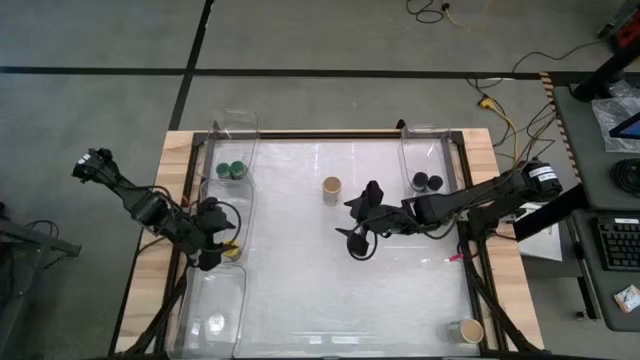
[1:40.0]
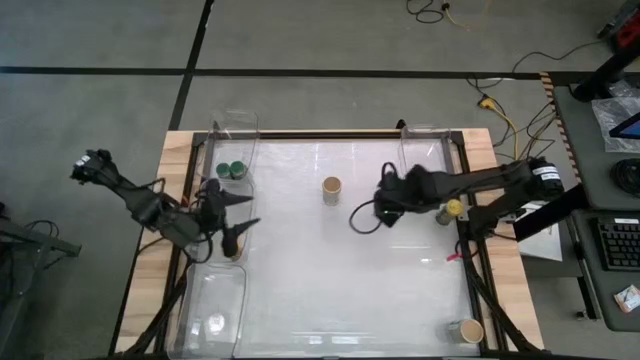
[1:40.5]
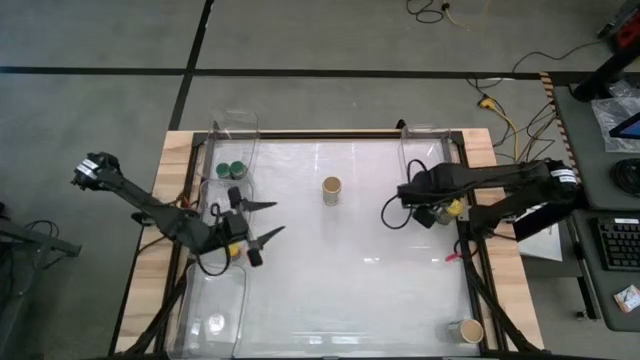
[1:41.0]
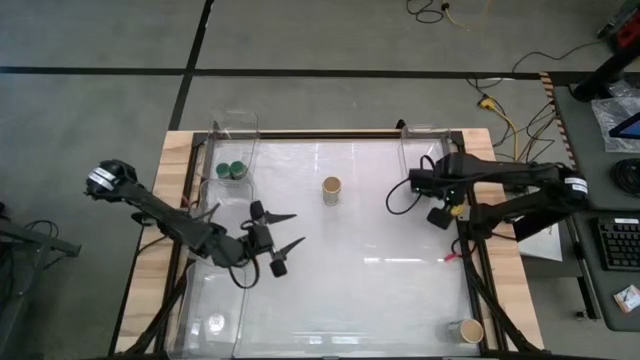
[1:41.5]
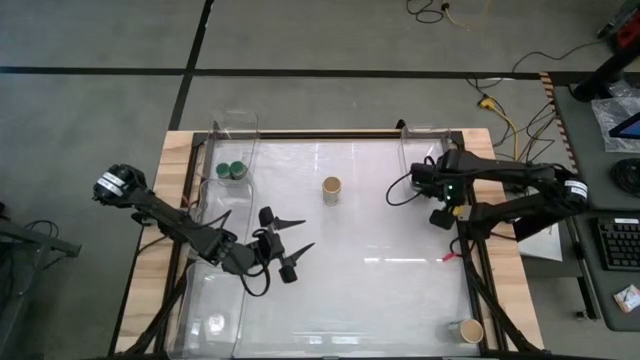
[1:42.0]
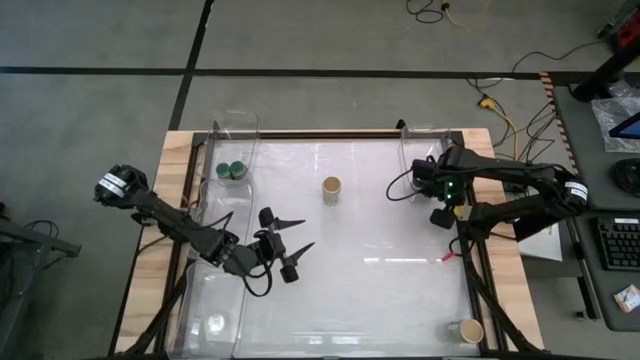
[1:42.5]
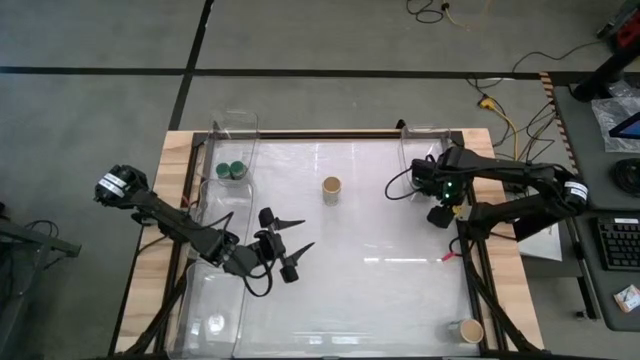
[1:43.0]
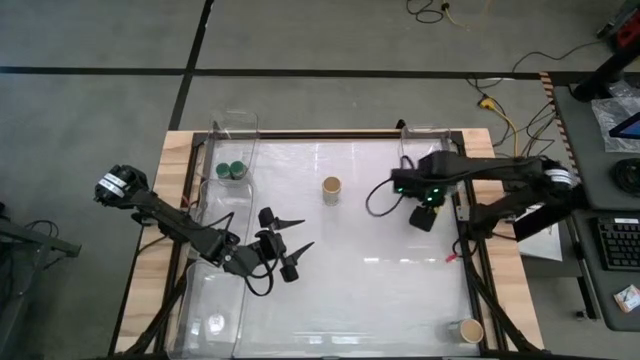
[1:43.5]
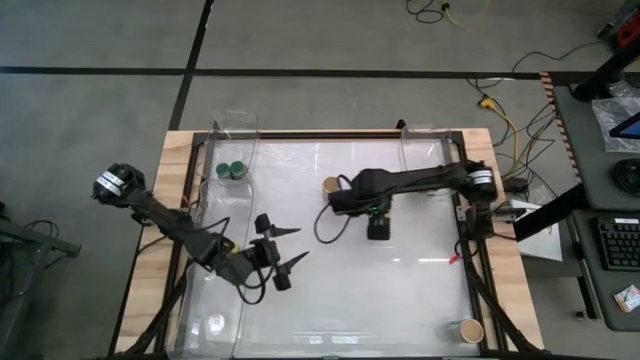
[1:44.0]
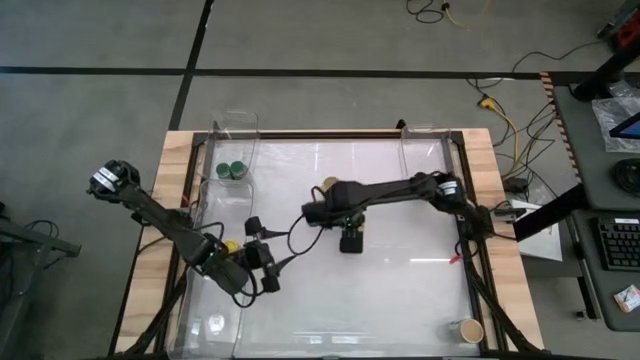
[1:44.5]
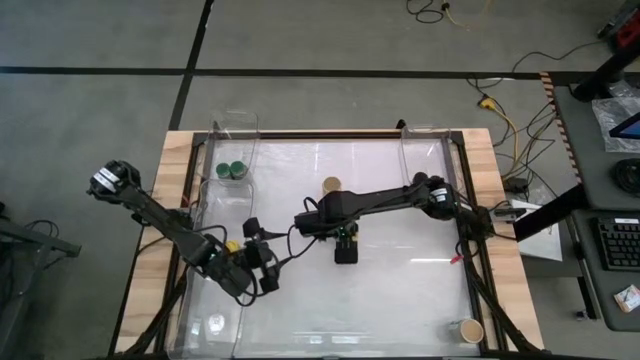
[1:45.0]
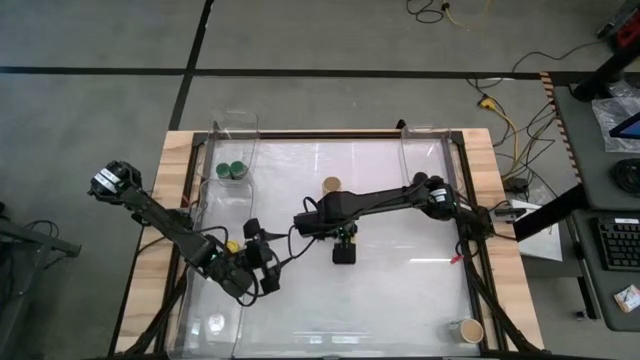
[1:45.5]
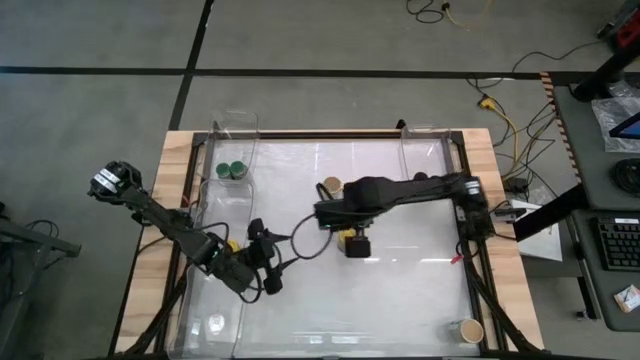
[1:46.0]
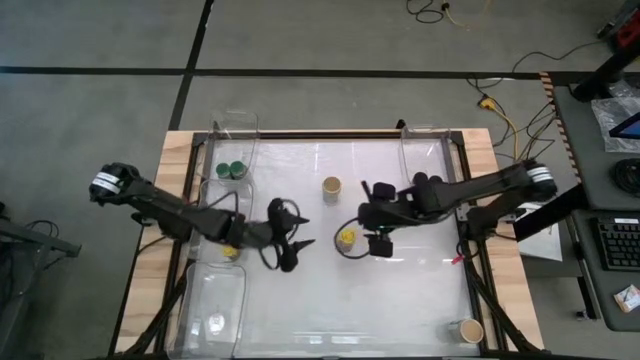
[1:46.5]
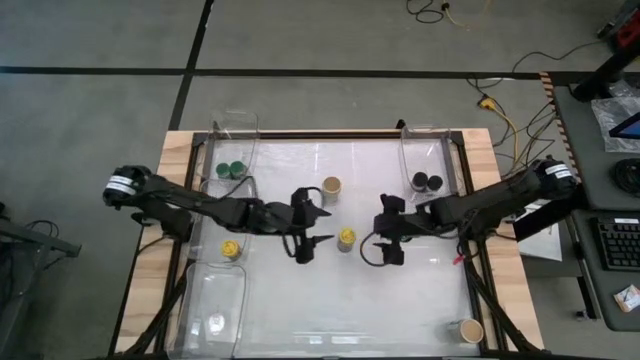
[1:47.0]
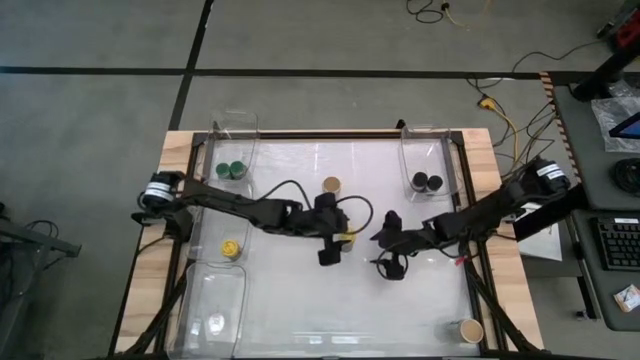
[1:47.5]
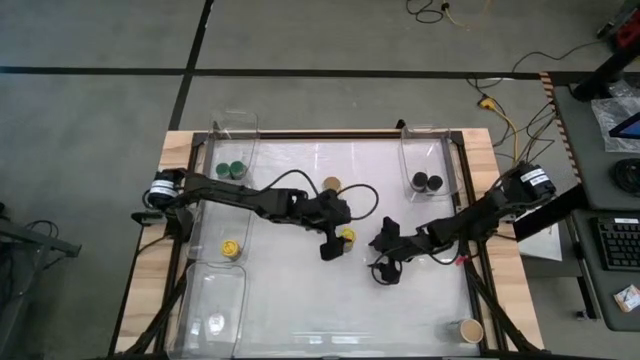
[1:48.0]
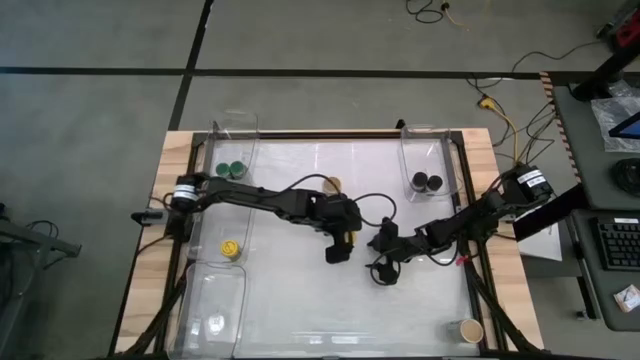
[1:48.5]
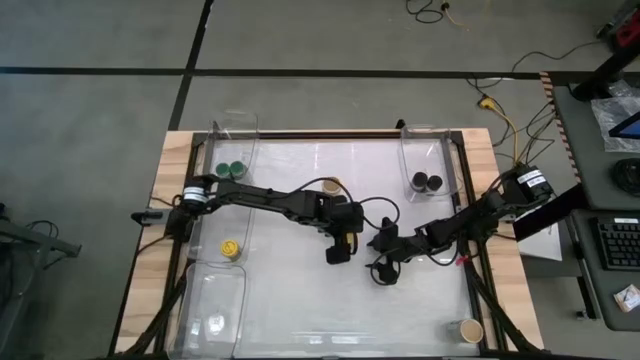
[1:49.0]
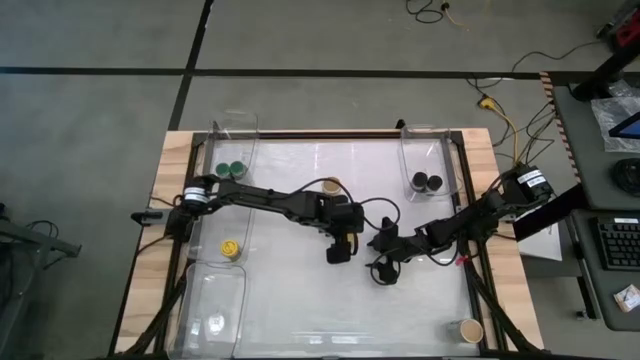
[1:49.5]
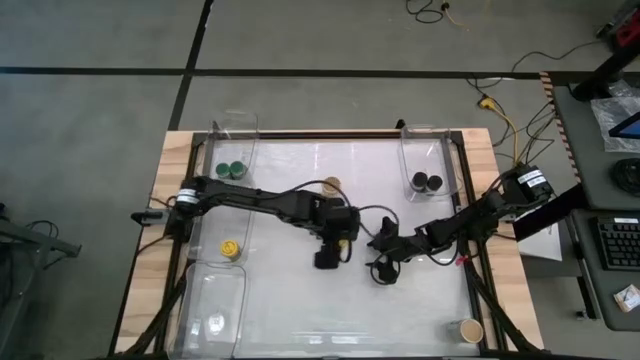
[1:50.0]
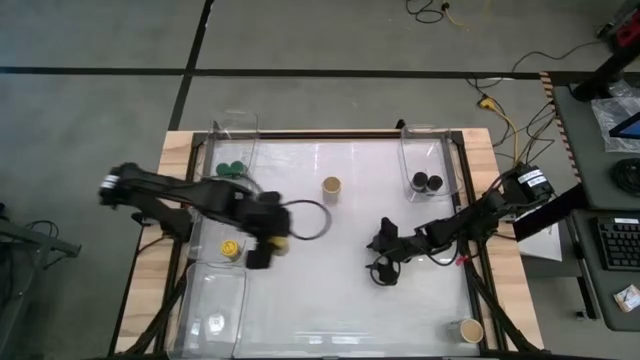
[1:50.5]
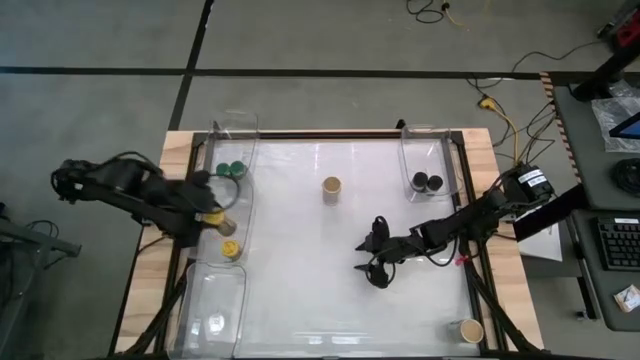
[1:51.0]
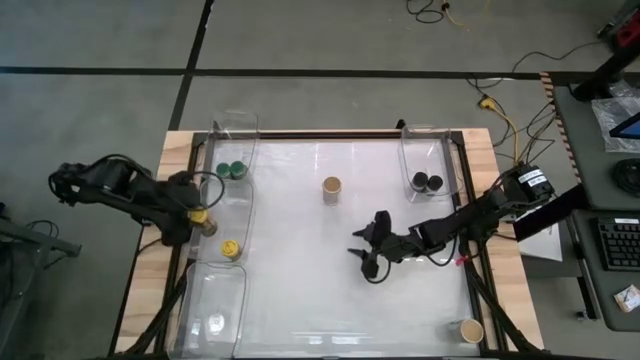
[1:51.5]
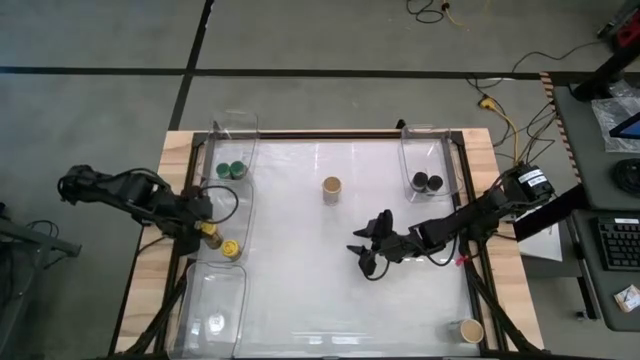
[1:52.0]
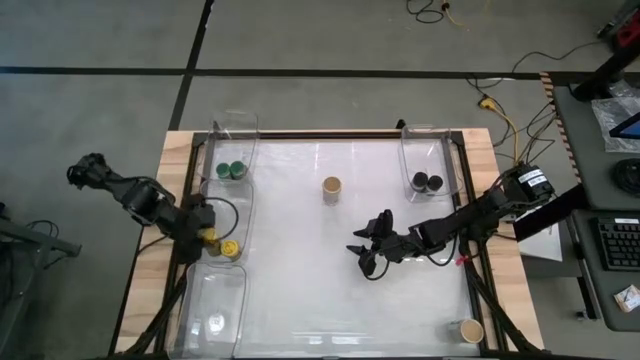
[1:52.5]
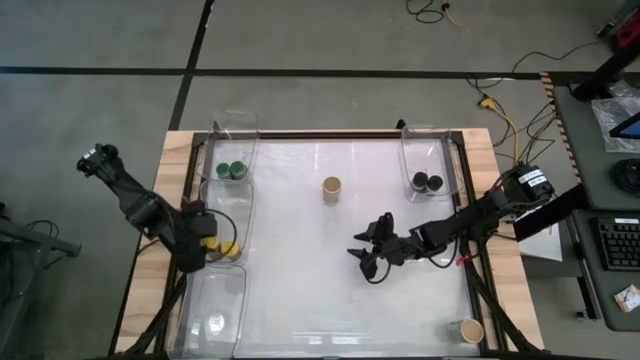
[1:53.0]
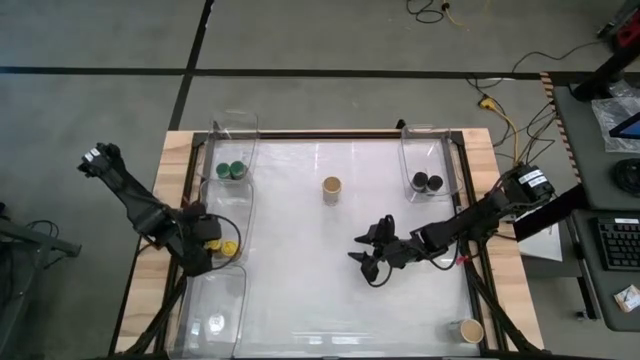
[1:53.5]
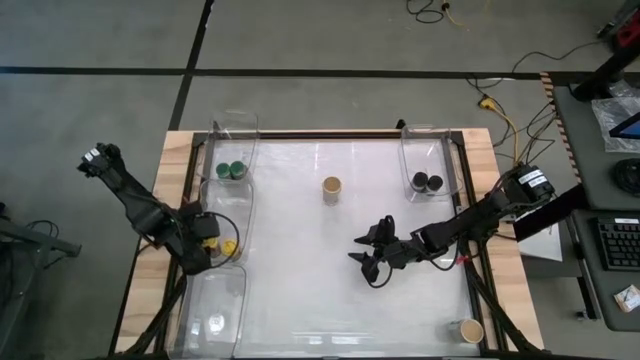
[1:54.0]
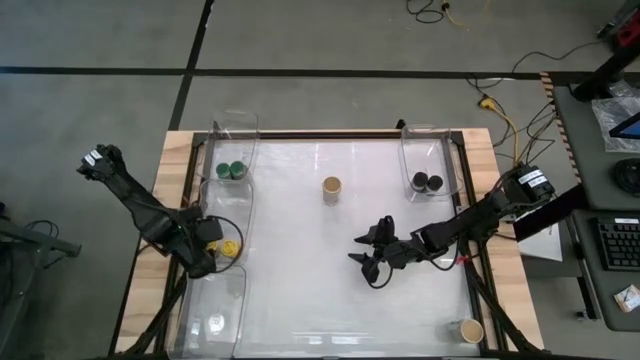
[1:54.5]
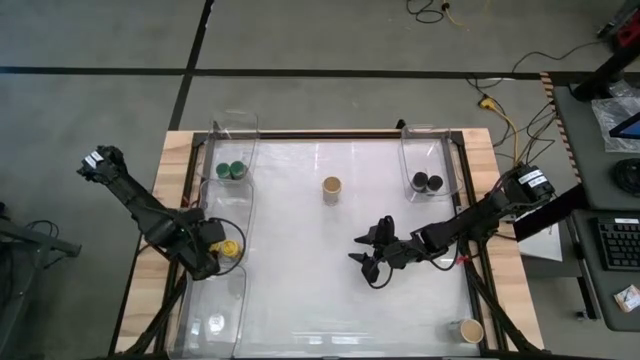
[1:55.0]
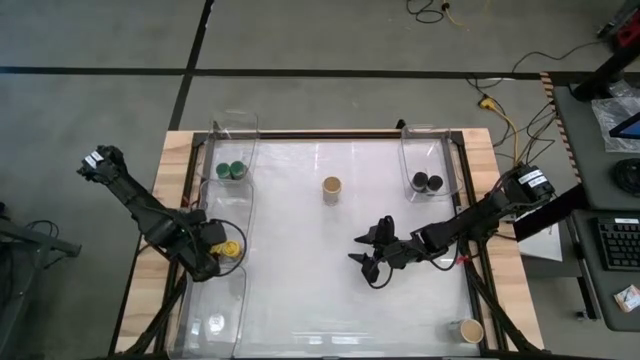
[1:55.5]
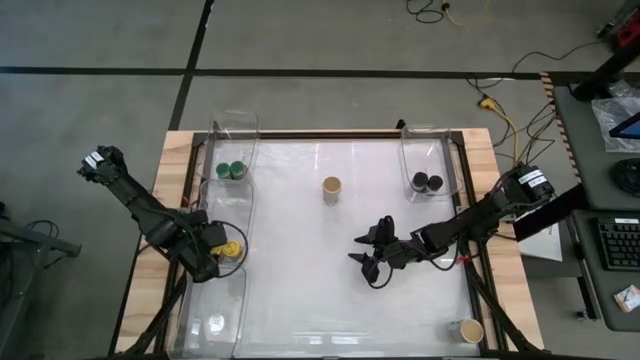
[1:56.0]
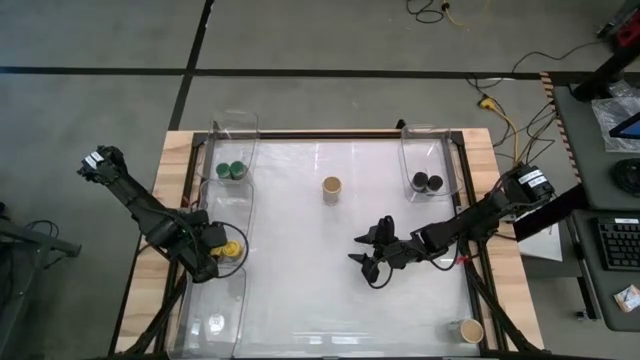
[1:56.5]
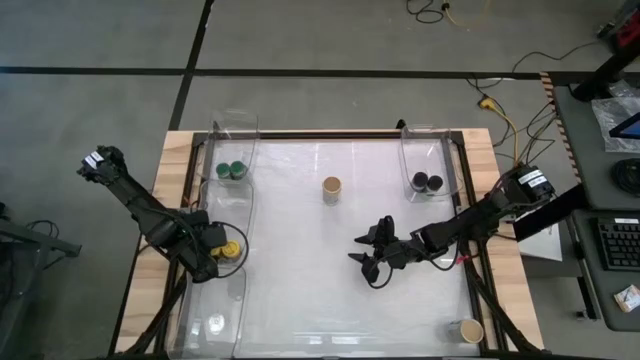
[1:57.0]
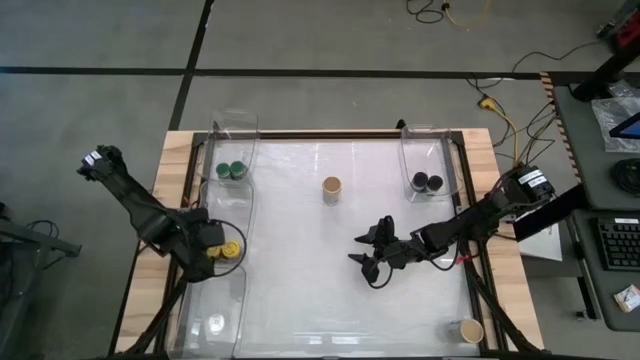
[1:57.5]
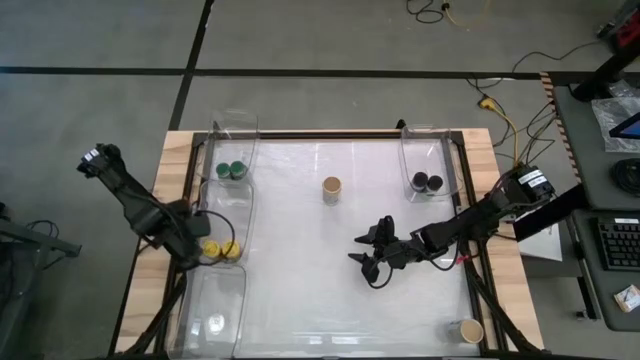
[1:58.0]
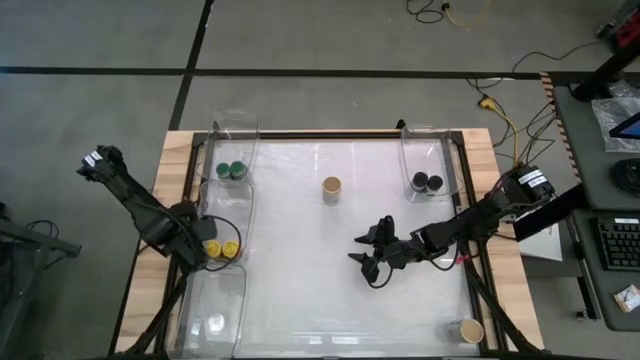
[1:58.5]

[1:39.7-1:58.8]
Task: Sort spices by type
Put the yellow spice bottle into the middle left transparent bin

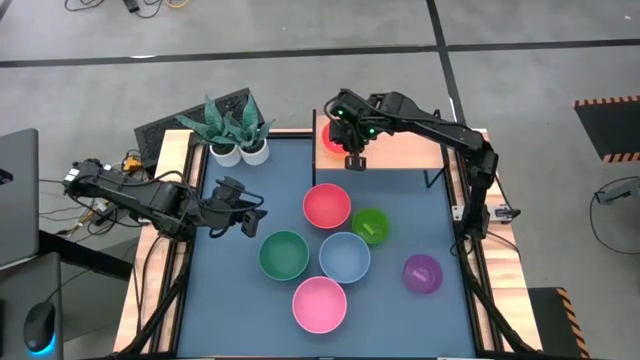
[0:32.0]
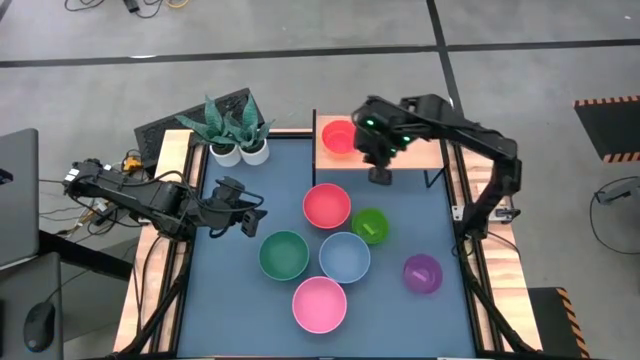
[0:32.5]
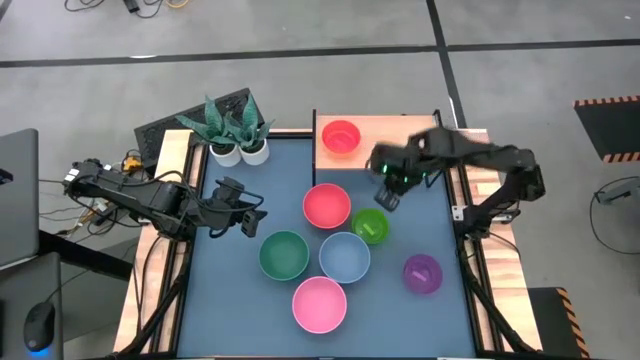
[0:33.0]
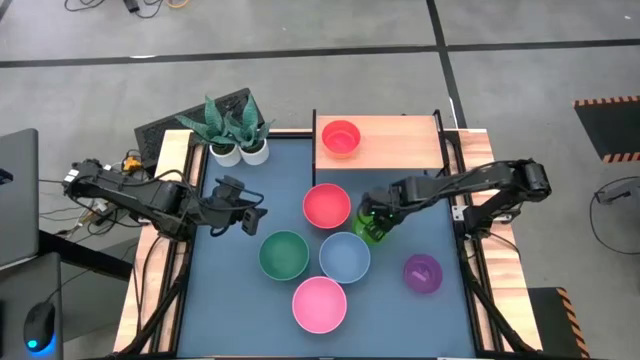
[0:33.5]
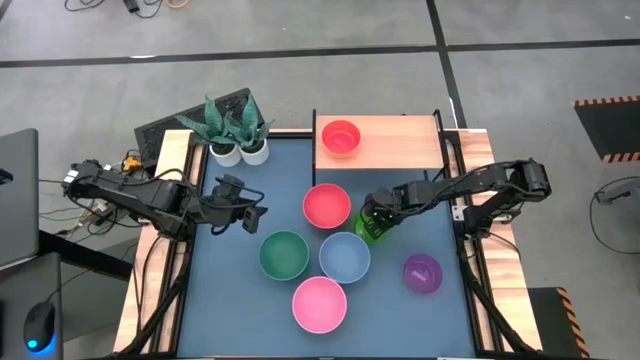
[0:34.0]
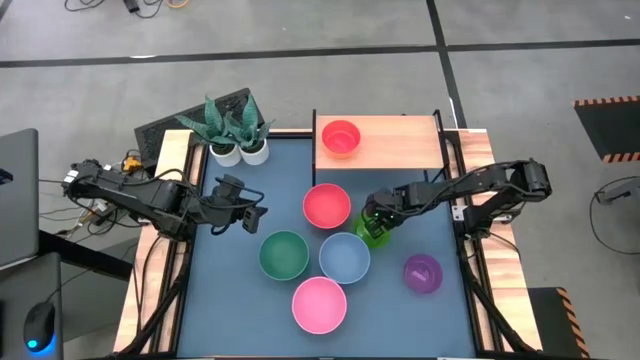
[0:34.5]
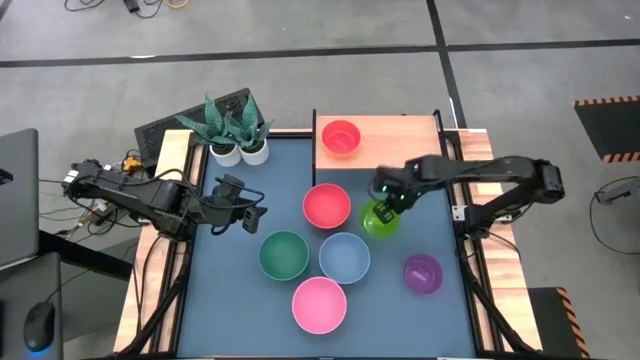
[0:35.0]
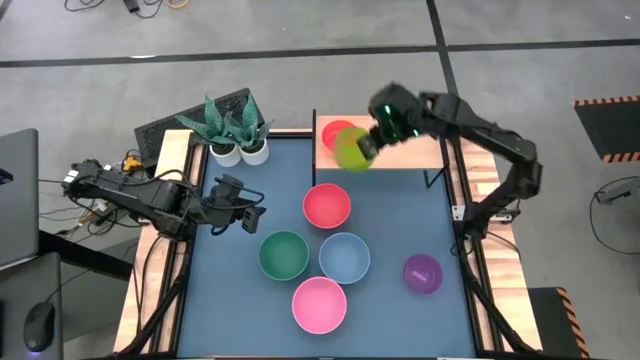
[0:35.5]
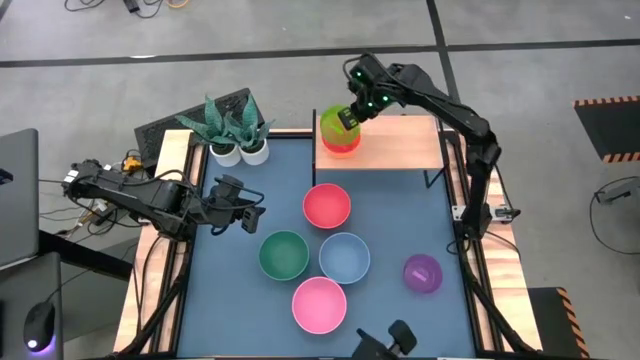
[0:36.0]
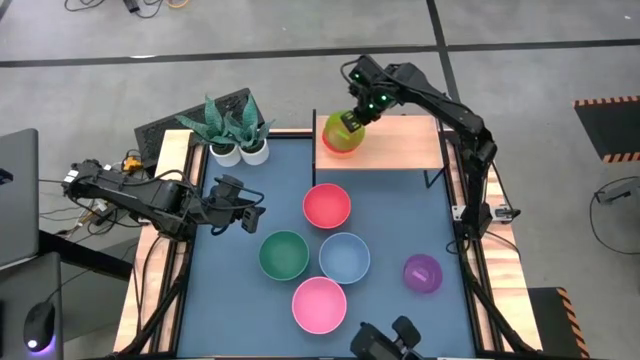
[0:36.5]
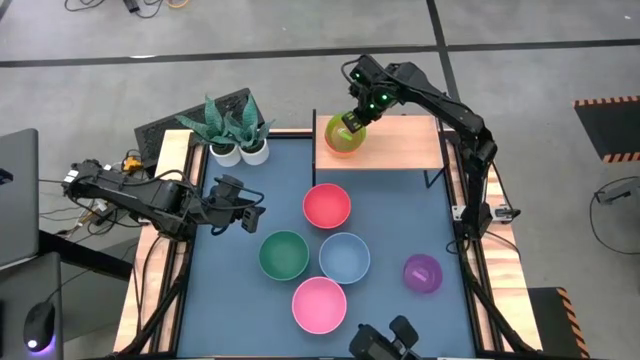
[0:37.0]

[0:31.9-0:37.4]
Task: Place and stack bowls onto a shelf
Stack the green transparent bowl on top of the orange transparent bowl on the shelf
